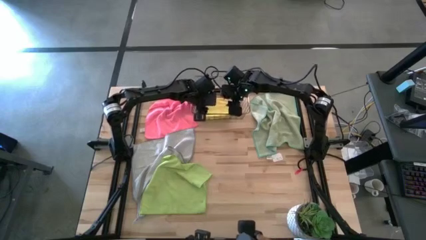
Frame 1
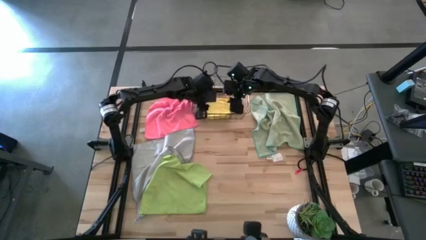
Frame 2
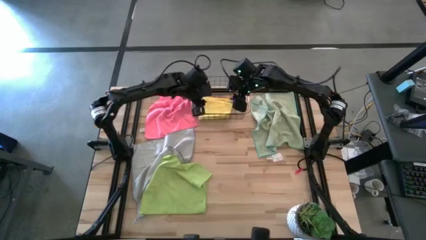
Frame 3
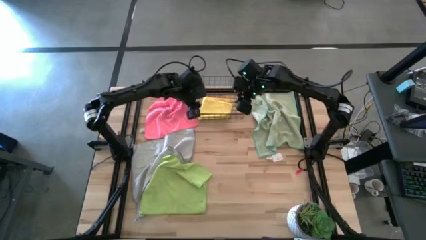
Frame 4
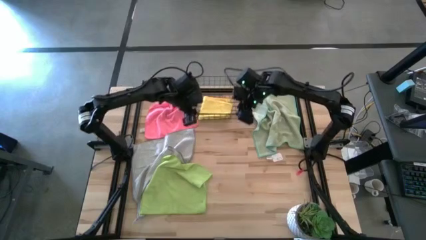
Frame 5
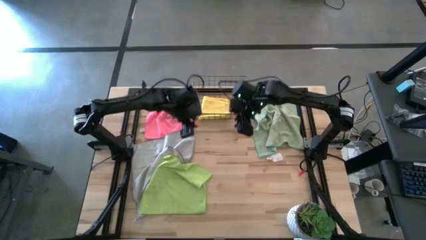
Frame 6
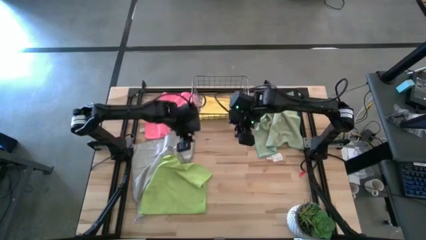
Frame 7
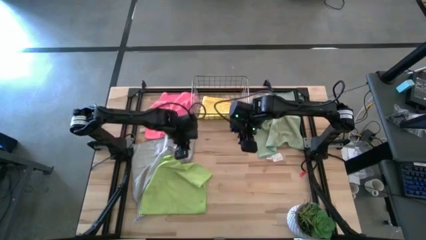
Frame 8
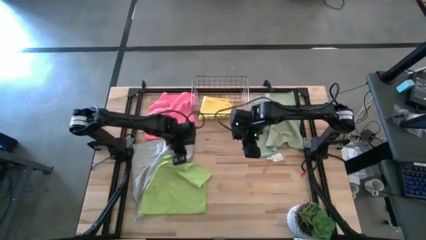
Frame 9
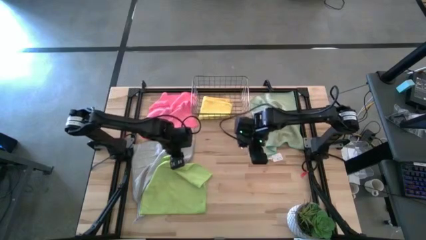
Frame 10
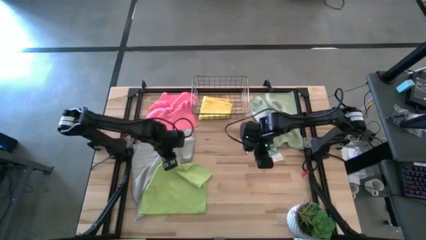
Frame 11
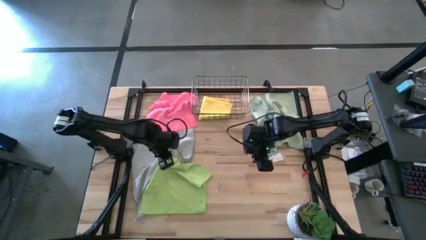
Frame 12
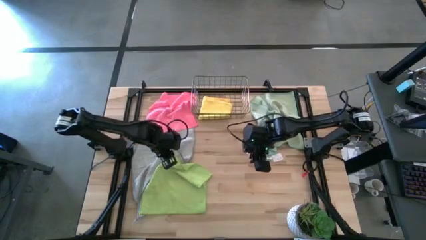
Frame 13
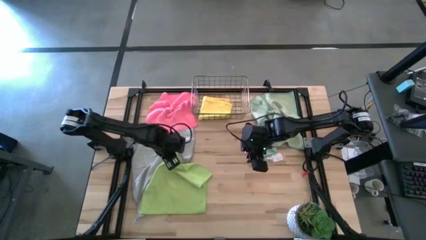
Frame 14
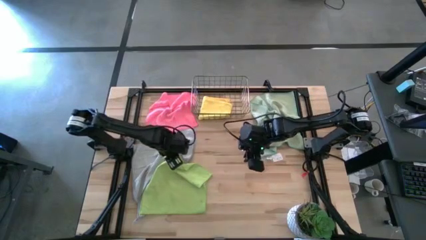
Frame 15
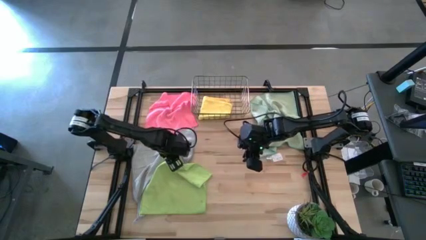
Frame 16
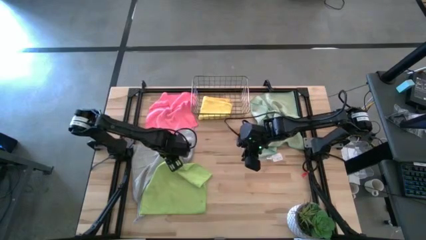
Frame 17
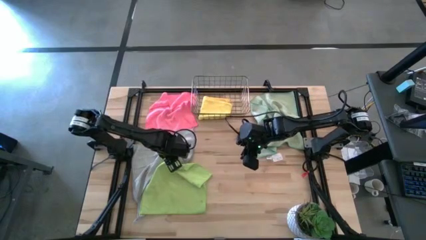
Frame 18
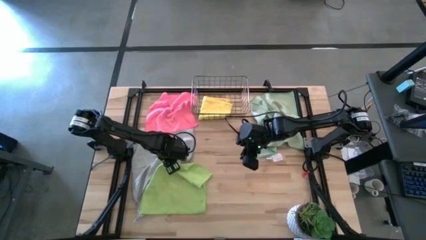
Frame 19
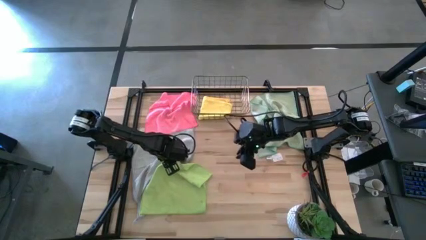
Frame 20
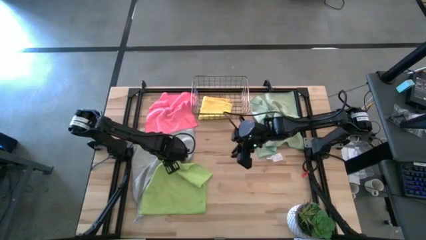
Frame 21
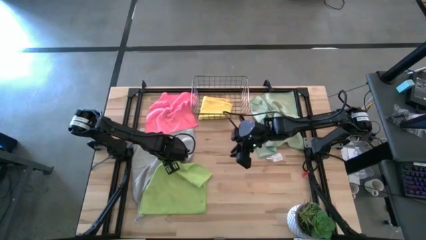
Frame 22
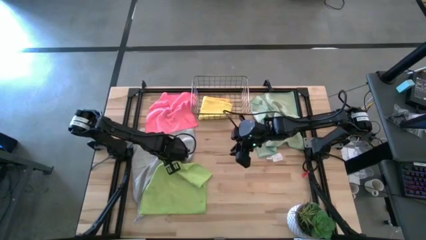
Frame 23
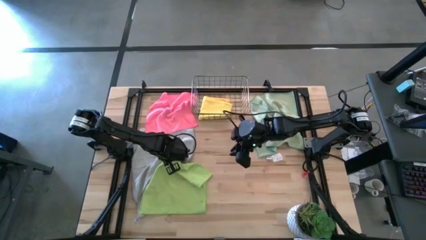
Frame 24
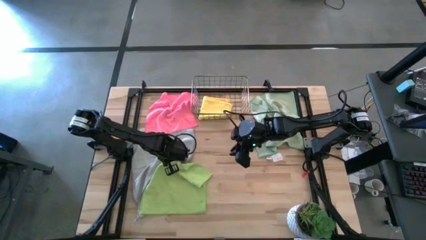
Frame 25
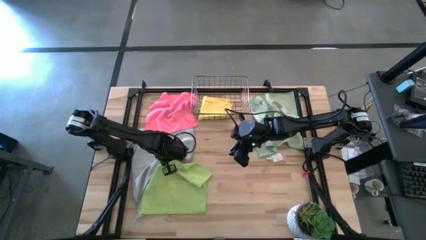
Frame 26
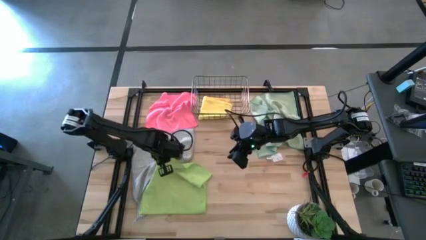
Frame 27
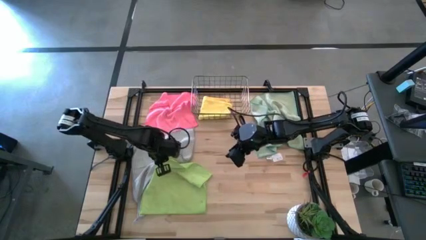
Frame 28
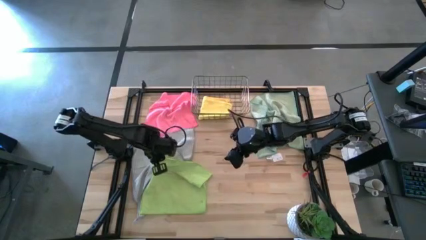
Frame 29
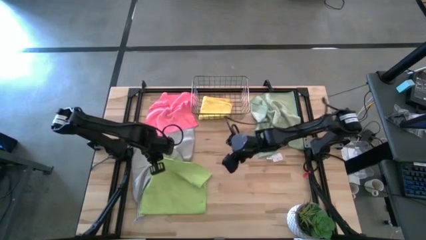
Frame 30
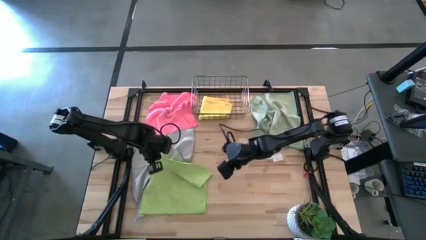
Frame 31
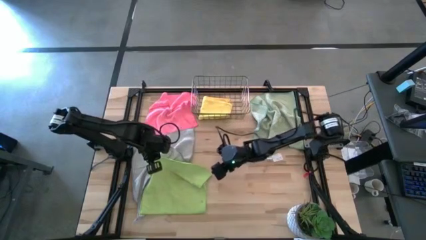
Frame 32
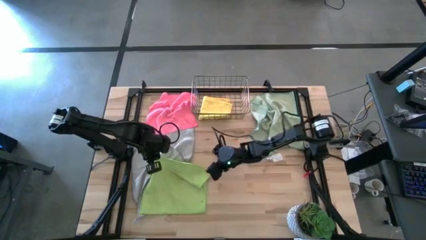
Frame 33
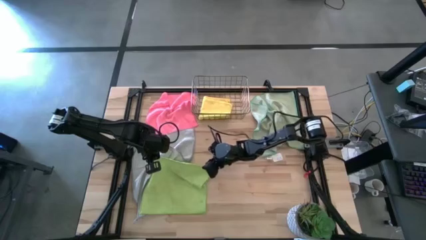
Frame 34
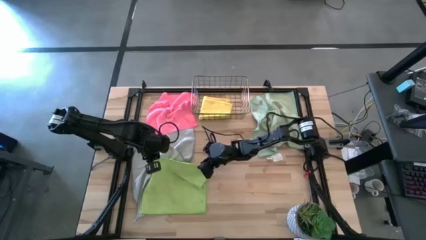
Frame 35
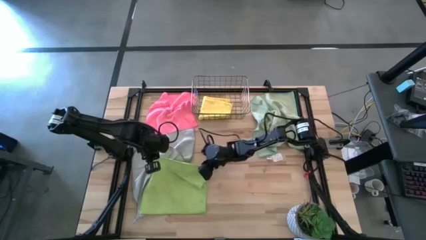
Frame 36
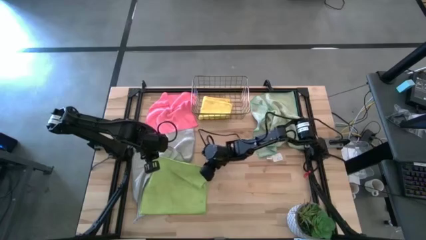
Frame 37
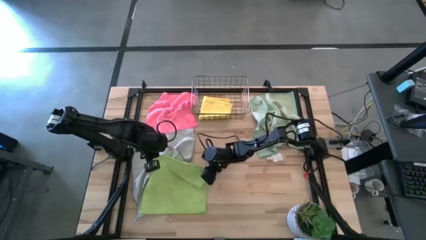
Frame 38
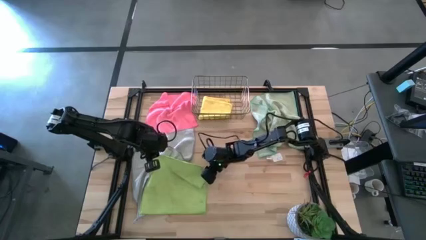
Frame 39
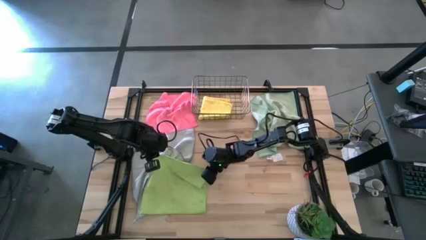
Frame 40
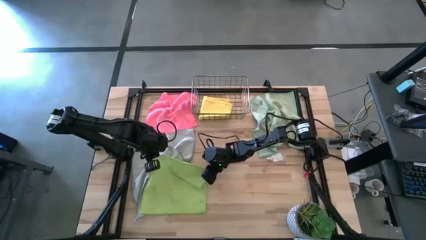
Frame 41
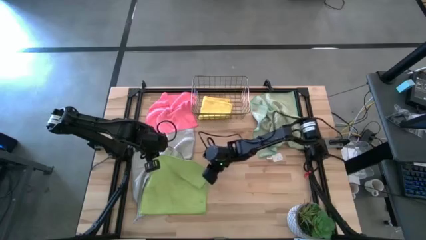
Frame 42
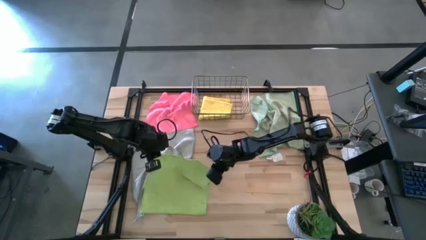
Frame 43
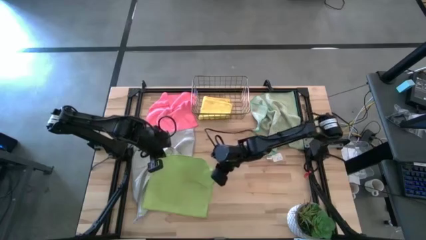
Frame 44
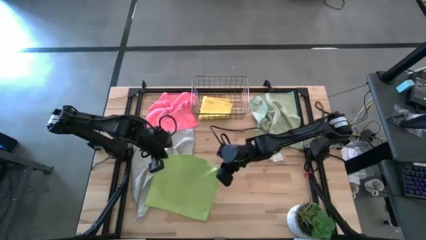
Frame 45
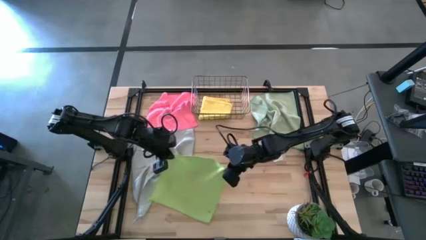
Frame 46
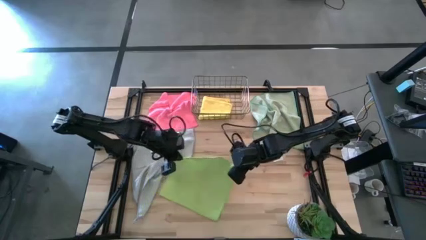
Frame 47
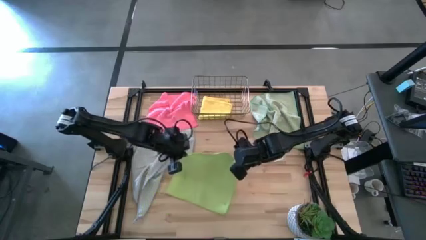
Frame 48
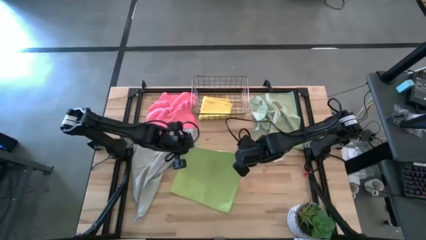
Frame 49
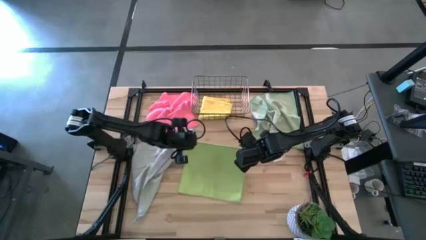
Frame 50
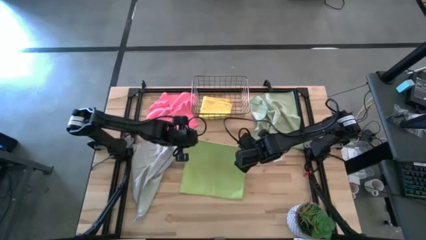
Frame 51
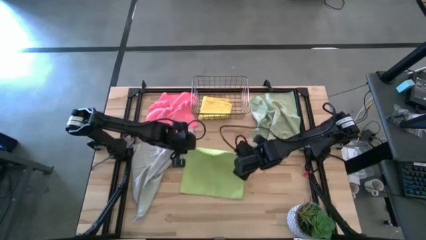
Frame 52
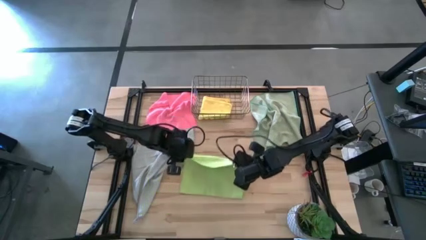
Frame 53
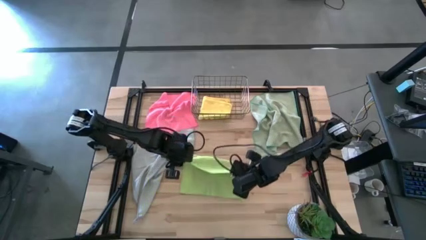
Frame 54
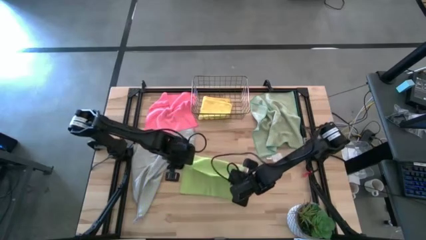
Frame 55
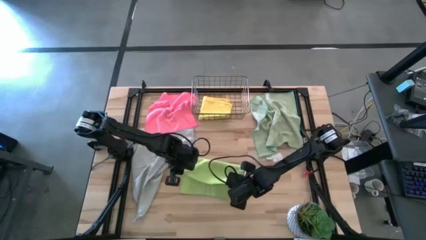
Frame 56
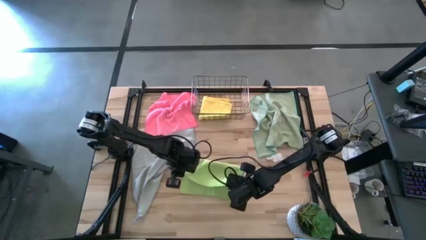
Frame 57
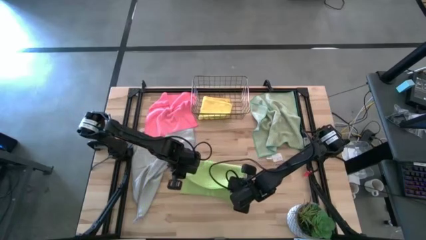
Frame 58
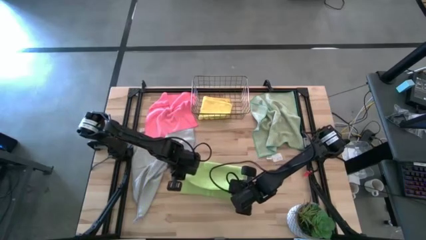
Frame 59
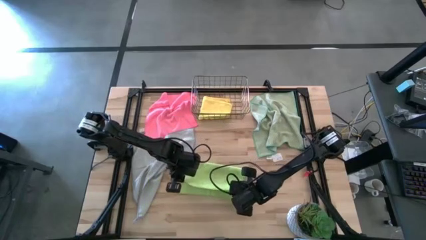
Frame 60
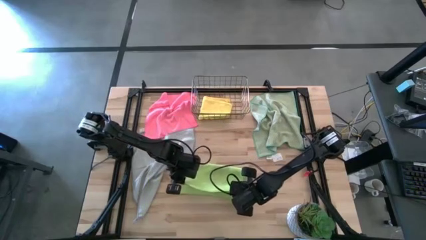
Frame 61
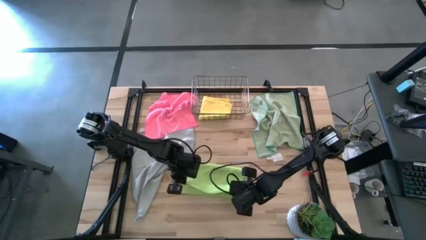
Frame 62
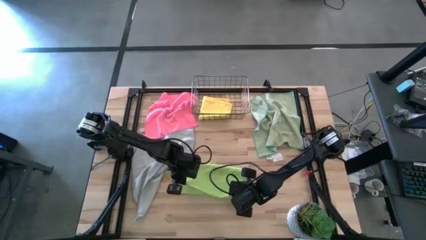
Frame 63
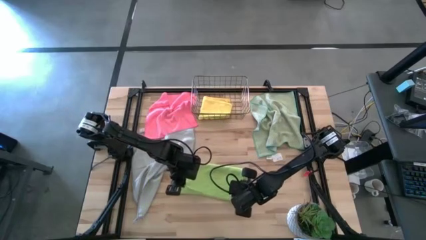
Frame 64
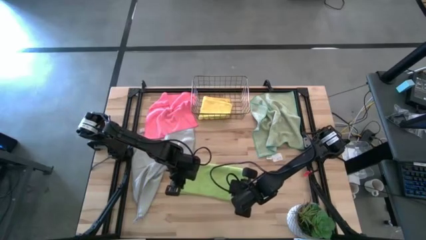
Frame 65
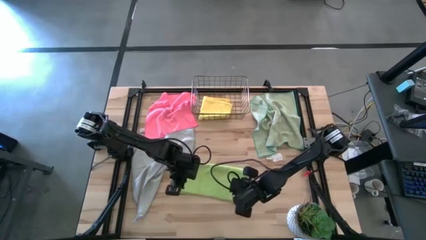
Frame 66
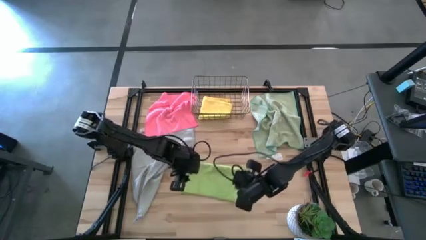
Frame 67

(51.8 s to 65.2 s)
Task: Fold microfiber towels
Fold the green towel
